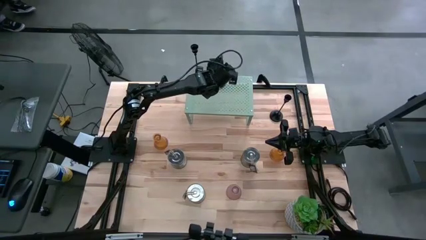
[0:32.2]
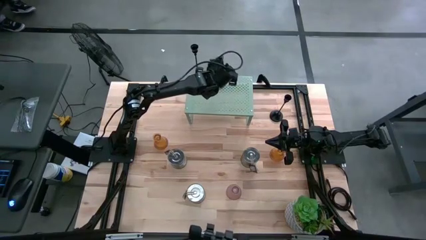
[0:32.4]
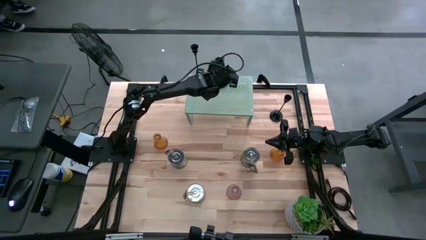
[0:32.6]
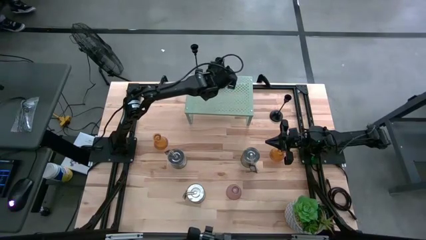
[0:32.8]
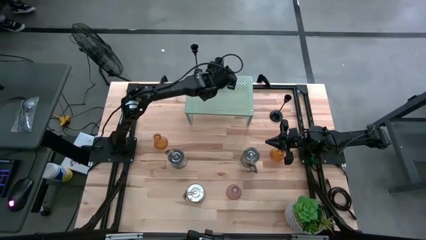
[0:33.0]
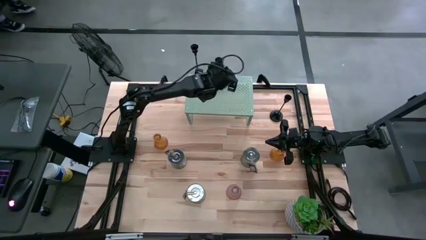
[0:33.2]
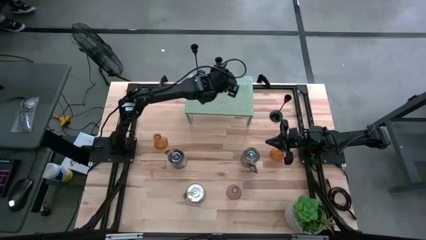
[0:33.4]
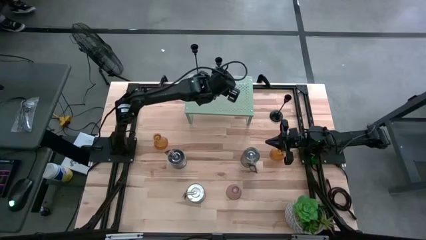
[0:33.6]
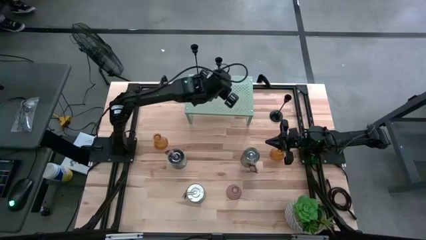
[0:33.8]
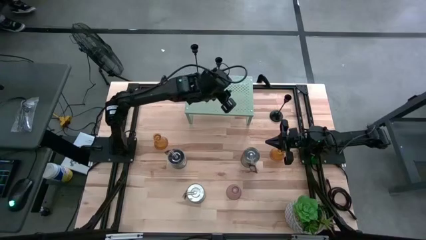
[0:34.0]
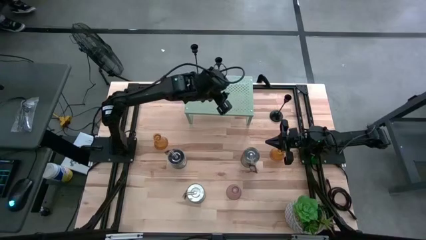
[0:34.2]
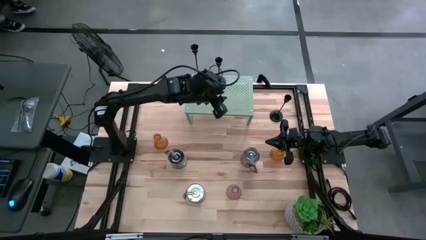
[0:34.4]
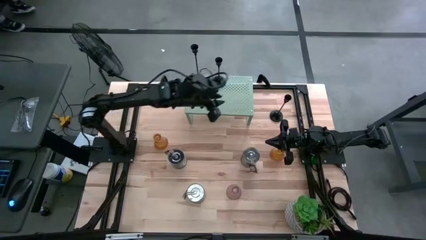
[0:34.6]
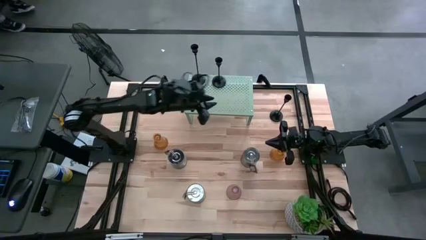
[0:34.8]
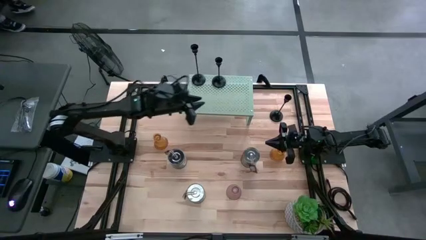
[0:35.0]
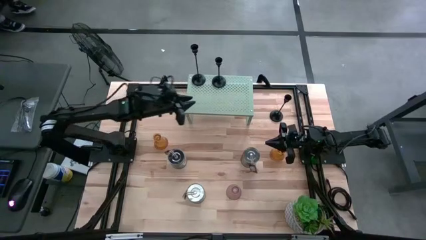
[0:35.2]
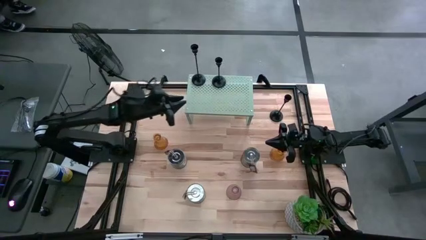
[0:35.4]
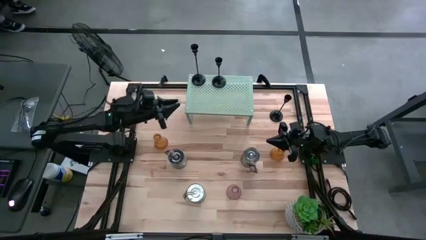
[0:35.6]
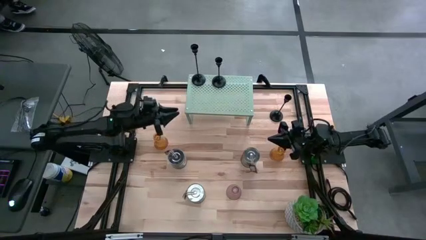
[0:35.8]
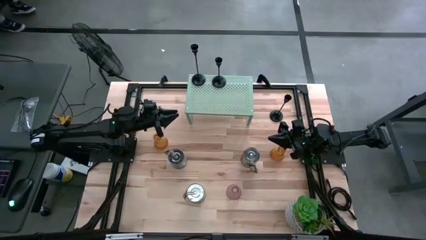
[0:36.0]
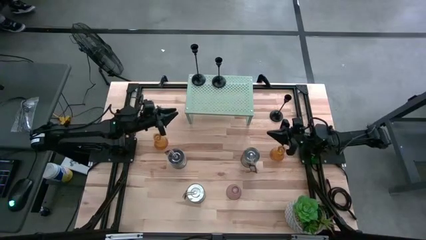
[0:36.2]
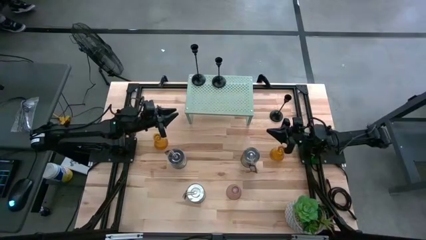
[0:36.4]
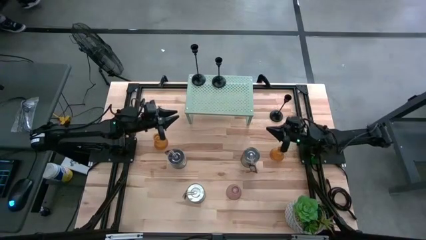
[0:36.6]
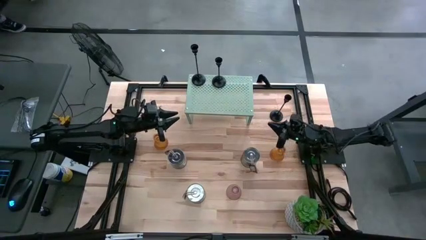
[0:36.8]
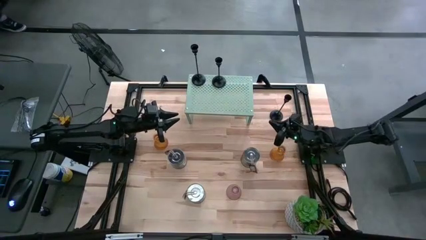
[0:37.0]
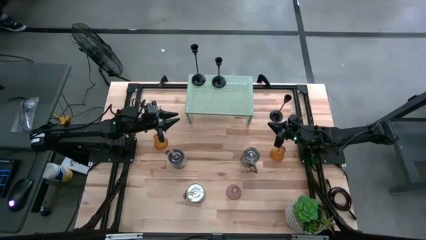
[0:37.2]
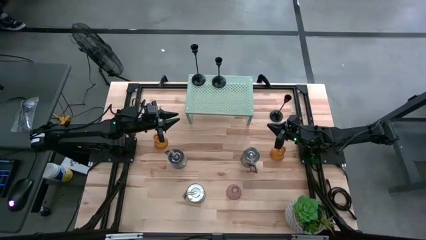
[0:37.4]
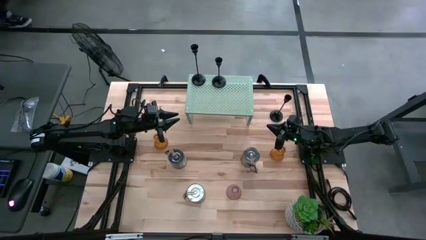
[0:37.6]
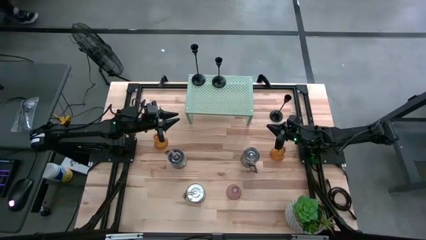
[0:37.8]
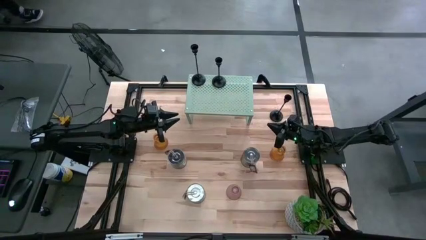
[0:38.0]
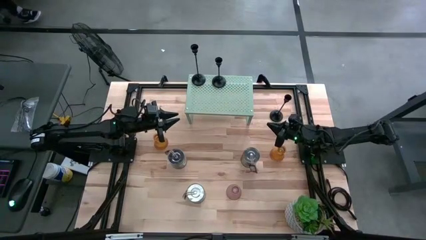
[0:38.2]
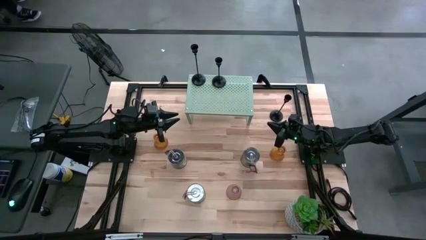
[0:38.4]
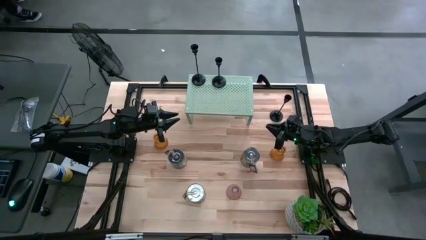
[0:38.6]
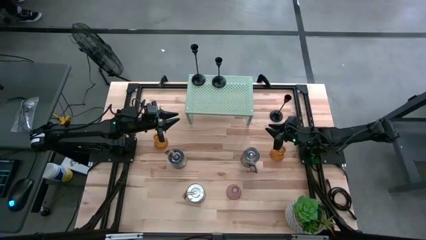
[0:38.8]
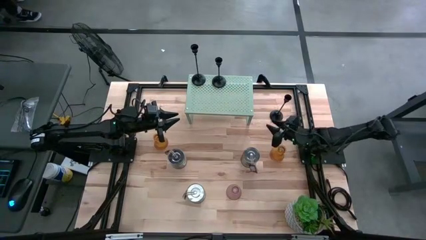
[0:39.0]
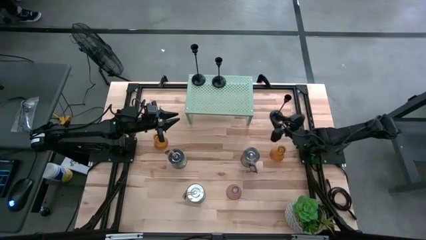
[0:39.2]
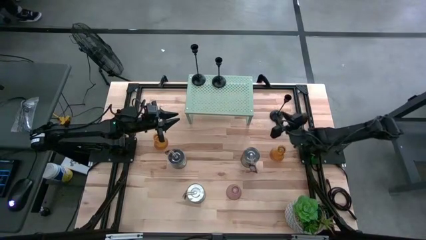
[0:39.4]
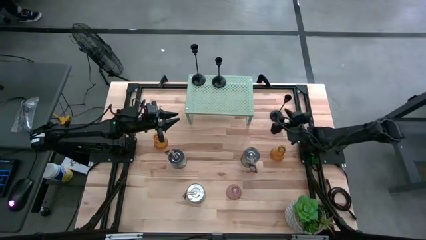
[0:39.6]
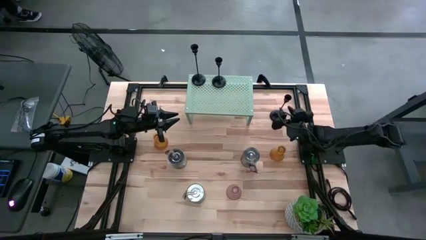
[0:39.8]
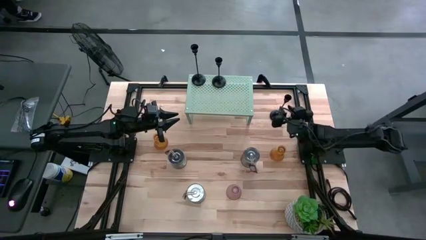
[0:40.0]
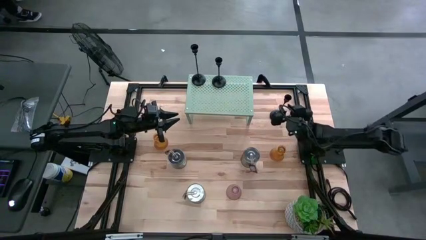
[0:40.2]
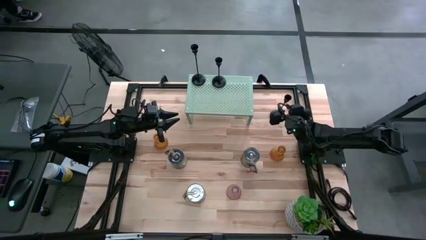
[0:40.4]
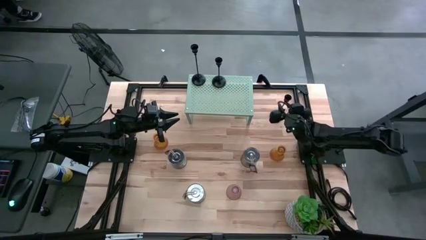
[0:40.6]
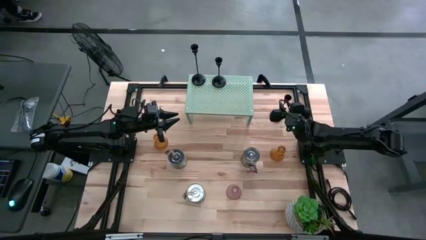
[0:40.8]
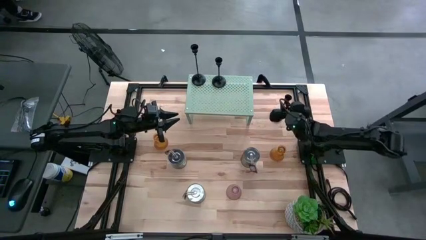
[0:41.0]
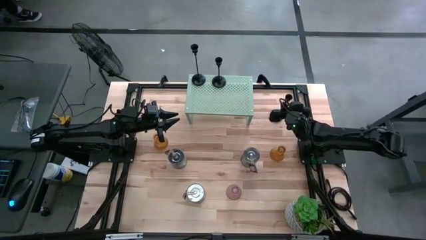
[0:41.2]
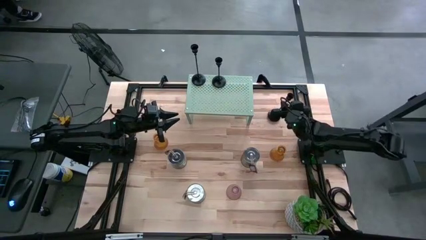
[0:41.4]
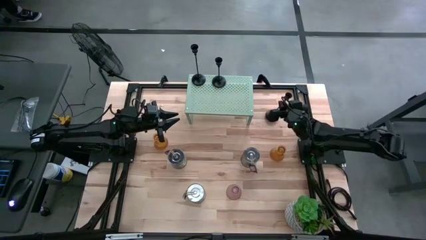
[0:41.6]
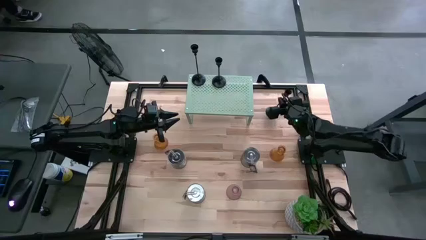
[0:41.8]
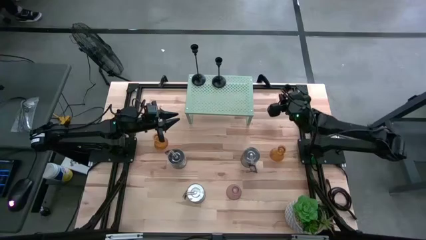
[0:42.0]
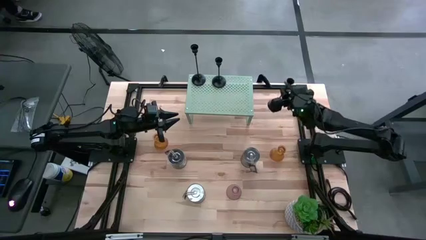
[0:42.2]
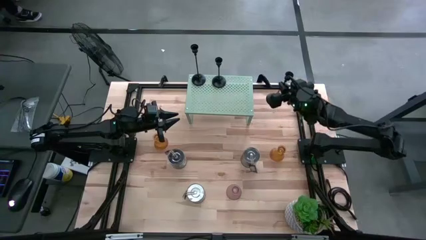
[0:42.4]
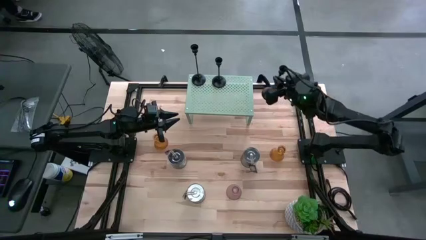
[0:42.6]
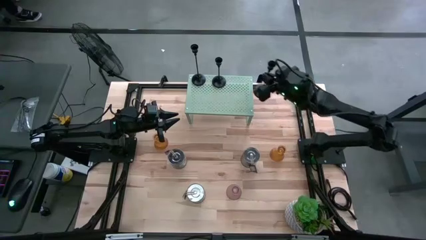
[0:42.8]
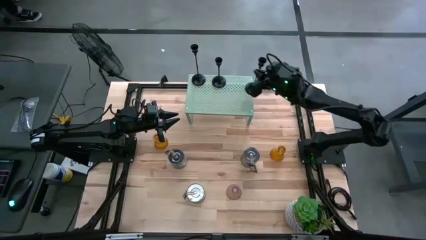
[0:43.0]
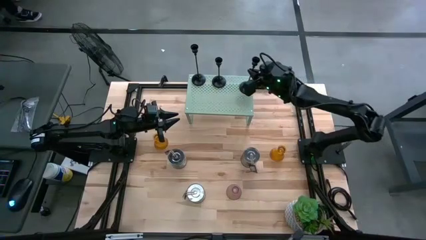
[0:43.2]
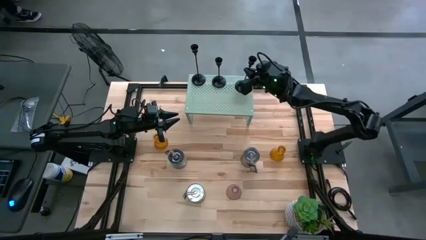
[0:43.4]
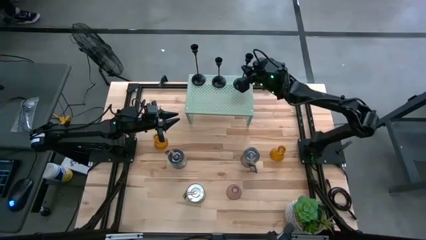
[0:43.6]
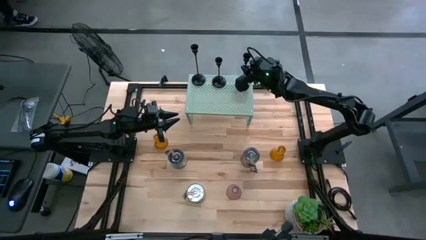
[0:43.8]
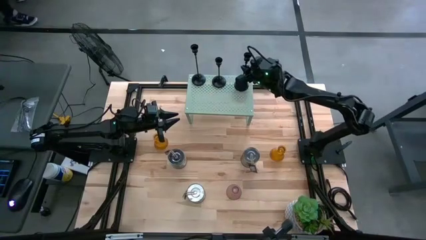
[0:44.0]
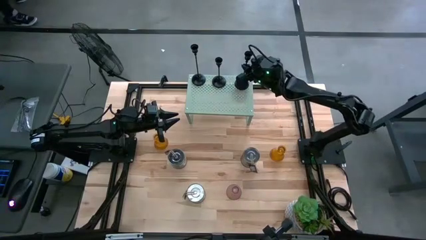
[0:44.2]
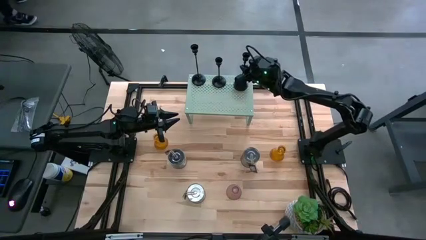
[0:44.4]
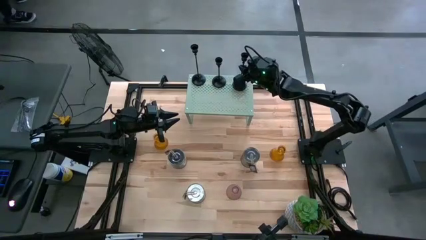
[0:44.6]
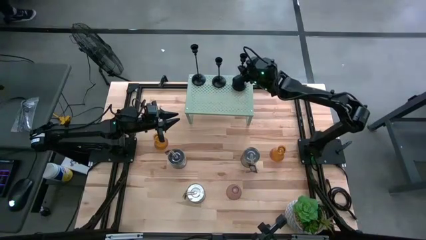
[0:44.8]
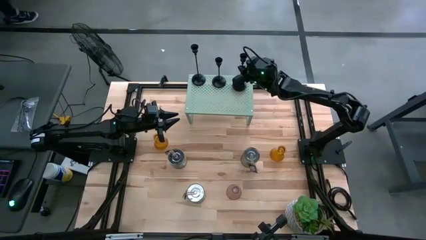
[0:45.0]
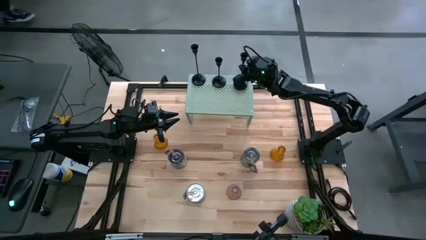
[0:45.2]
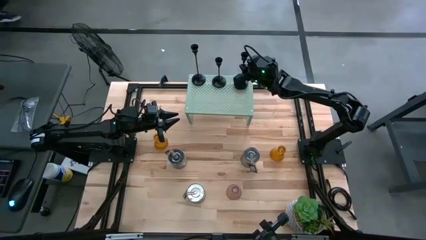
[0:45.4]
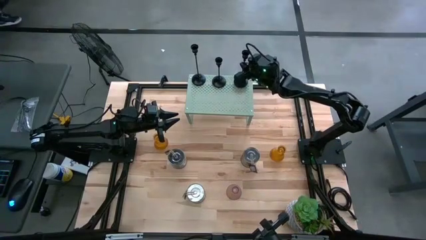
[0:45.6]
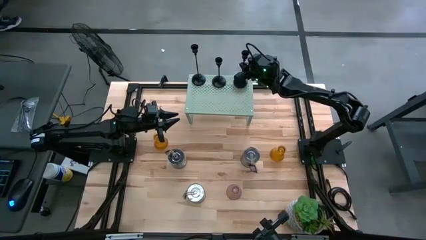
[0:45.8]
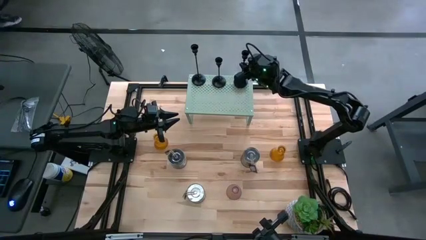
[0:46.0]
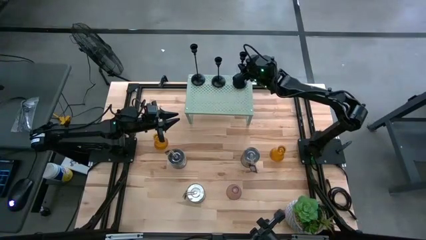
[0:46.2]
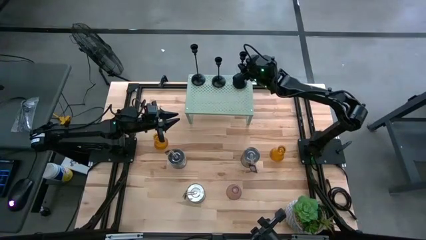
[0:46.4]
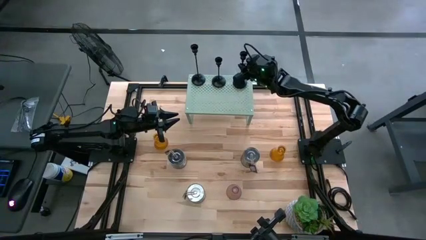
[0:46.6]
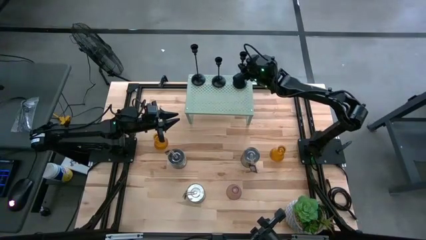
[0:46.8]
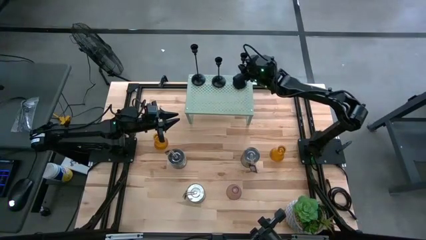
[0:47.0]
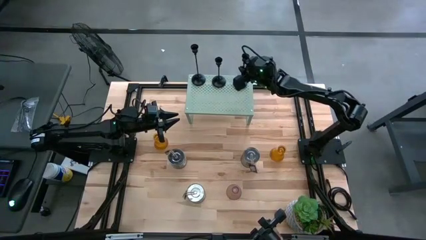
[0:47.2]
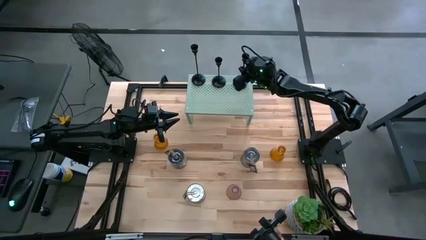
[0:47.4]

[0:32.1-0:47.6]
Task: Pick & Place candle stick holders
Put the black candle holder on the shelf
